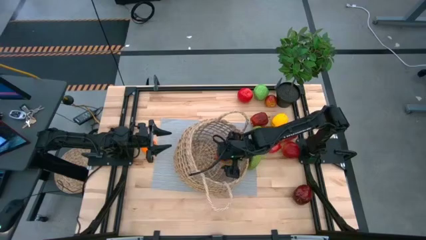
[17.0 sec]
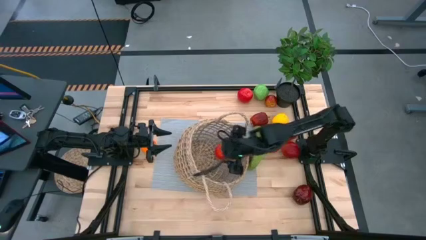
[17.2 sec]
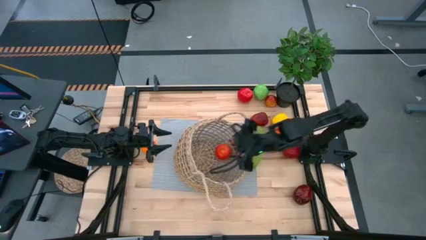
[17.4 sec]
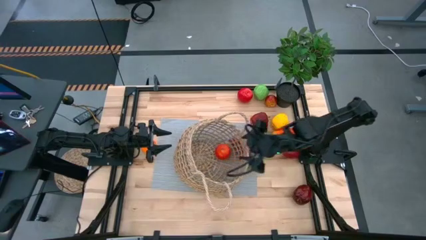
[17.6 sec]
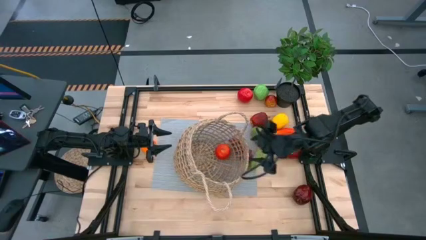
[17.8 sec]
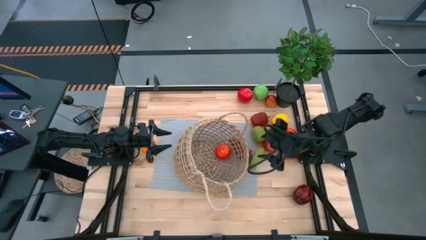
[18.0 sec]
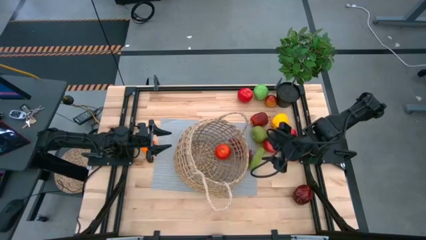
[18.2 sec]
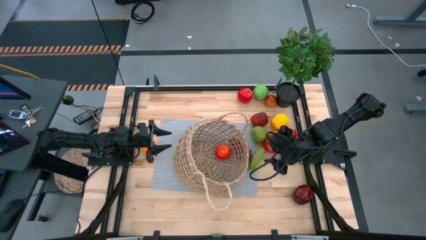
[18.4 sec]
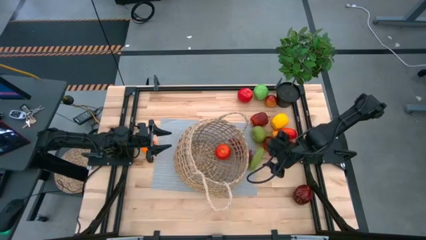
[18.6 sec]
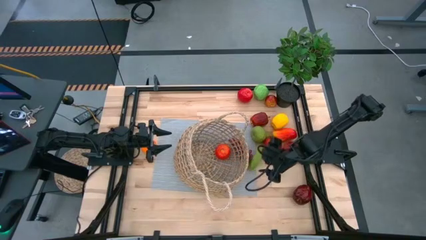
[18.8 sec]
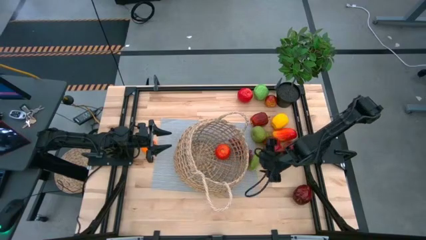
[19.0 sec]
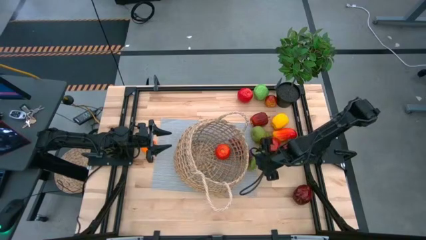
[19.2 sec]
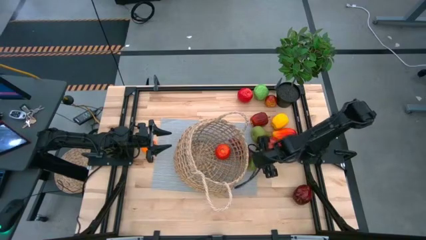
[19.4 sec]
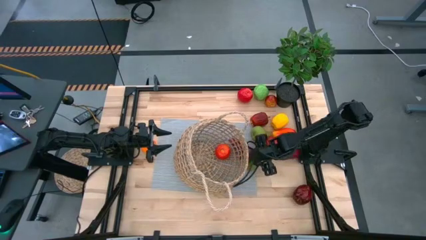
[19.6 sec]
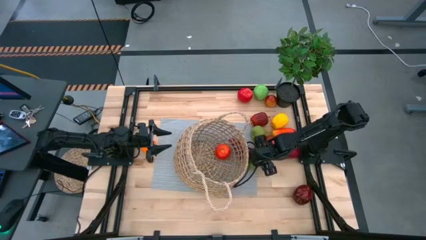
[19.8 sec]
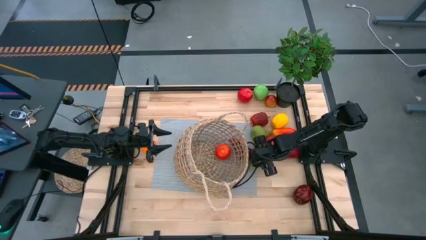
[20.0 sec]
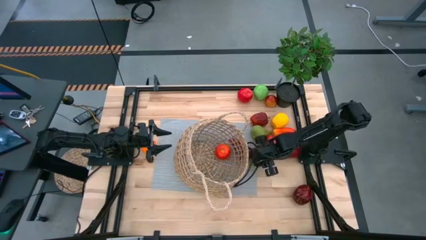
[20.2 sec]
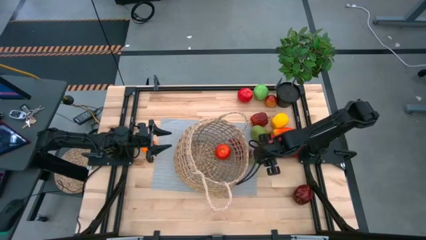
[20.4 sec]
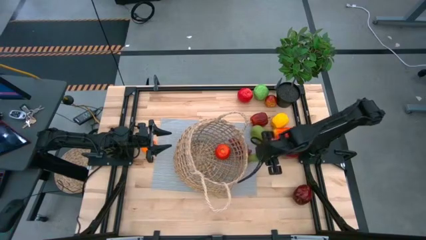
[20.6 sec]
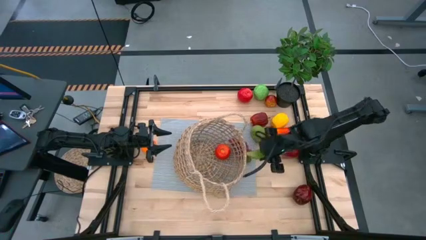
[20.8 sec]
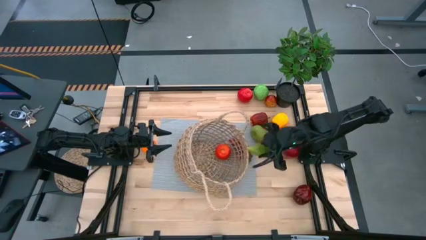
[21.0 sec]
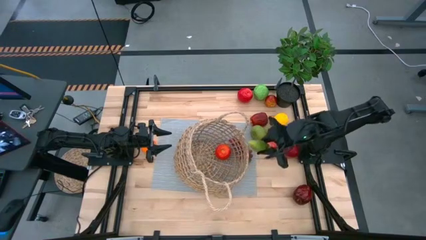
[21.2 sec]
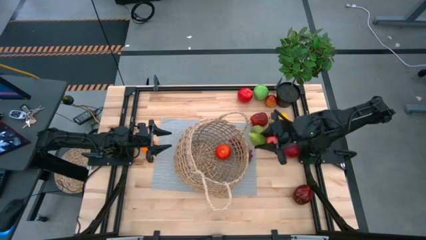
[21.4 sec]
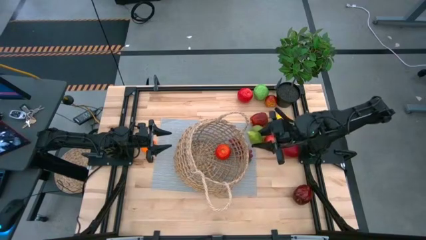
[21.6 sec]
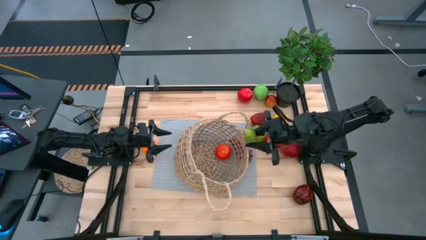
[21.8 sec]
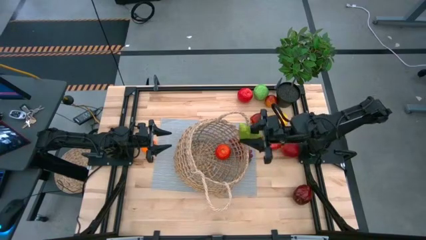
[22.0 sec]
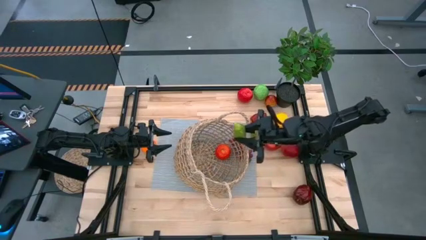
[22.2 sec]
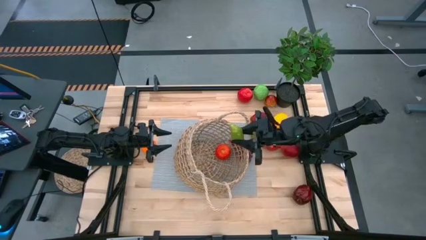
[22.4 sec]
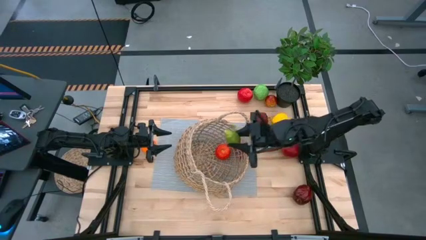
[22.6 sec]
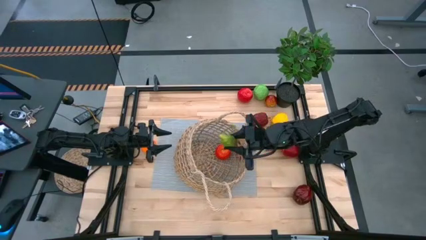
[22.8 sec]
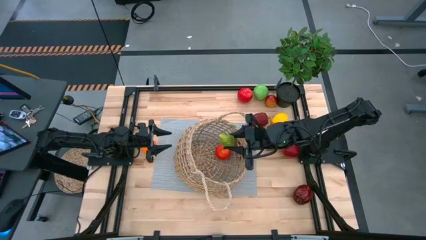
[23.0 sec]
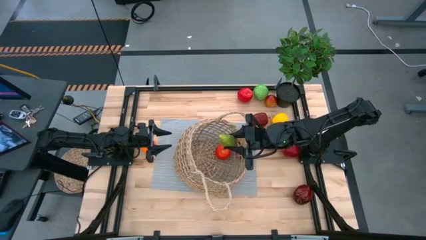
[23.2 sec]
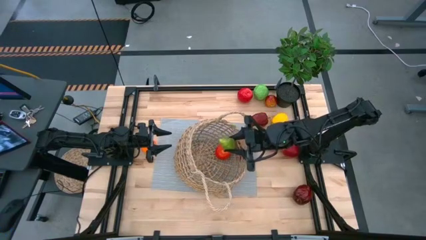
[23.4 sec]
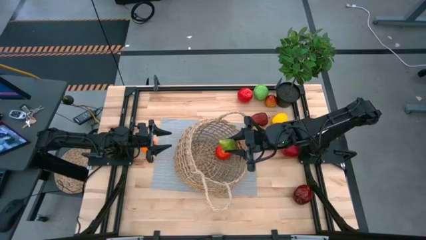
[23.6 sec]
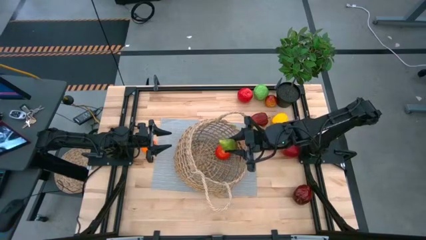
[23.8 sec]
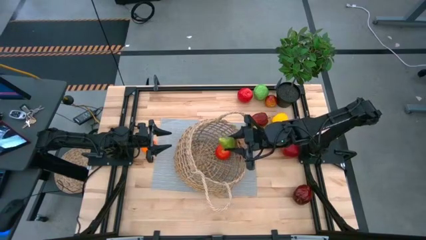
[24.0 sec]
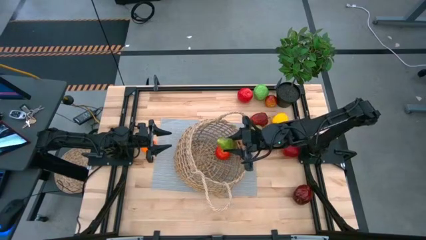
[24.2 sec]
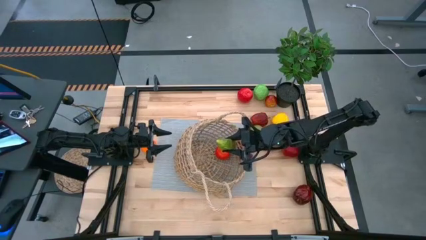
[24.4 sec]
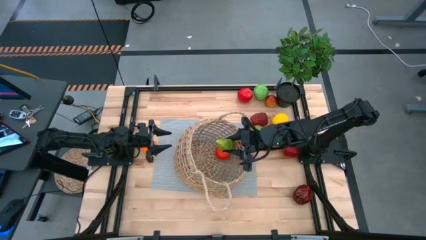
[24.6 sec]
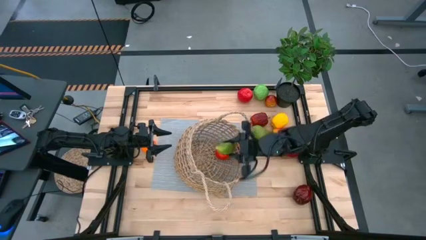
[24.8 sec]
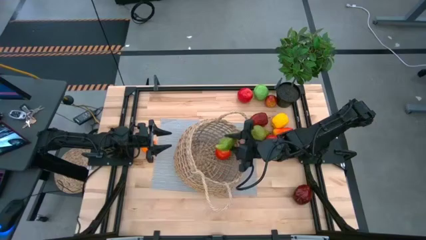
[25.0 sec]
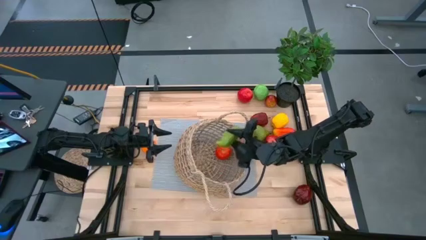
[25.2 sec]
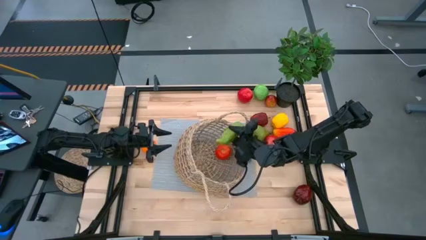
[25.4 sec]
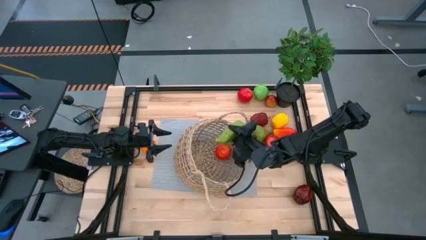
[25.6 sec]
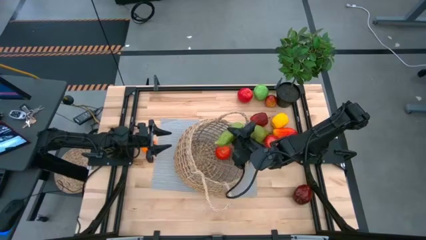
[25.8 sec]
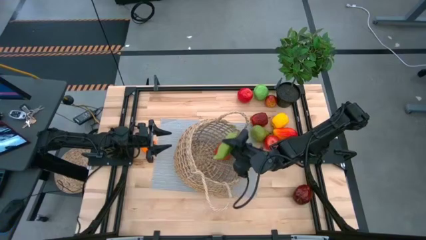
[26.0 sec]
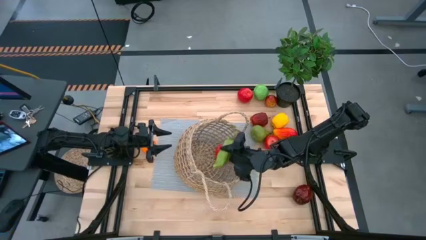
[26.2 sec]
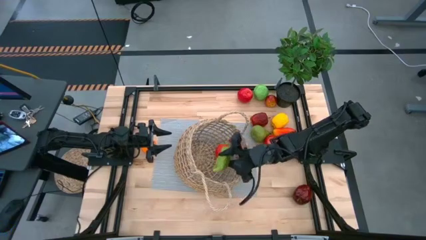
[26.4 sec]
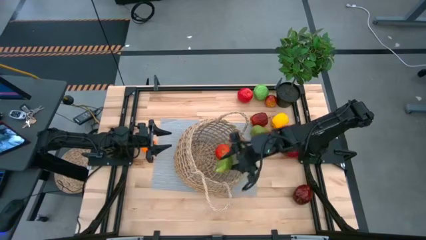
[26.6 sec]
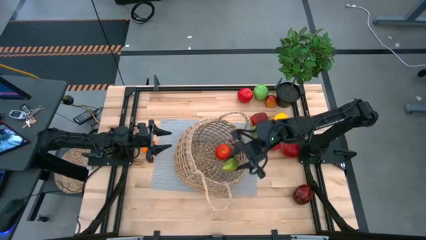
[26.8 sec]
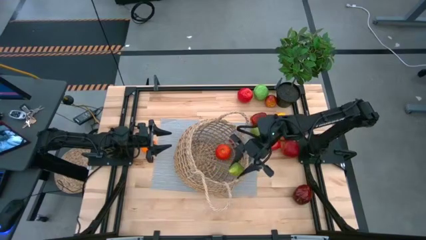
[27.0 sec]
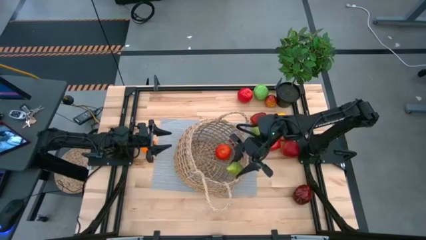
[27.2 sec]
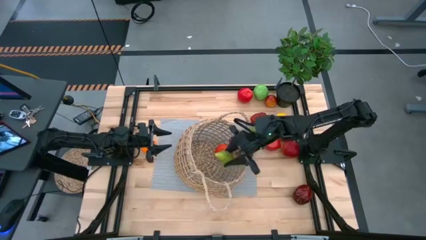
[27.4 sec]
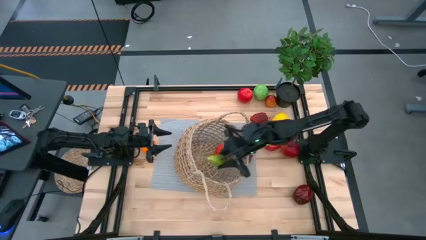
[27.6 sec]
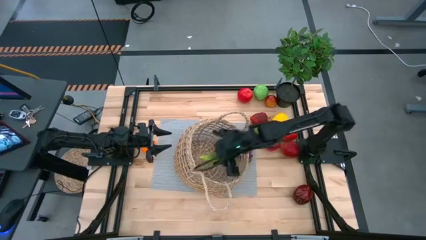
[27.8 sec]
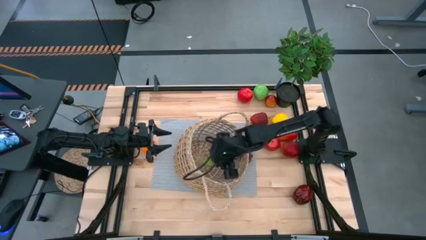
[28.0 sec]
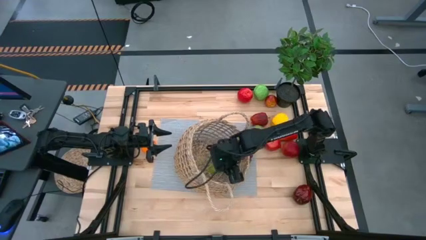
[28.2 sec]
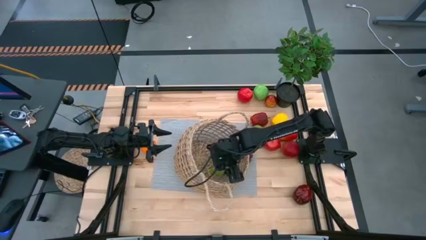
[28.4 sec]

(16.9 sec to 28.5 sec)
Task: Build produce basket
Put the cucumber into the basket
